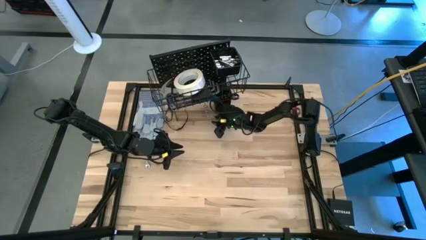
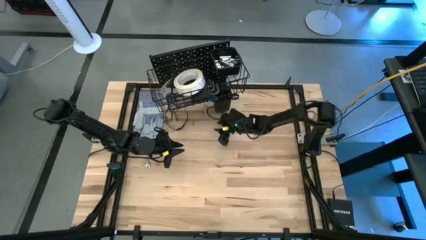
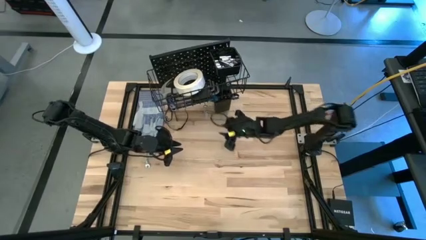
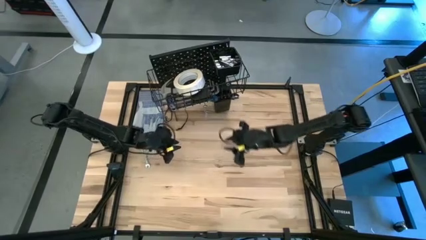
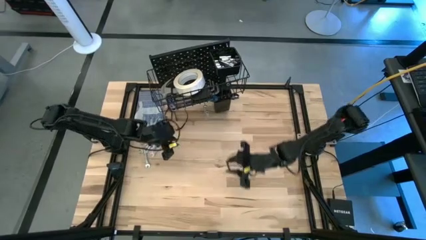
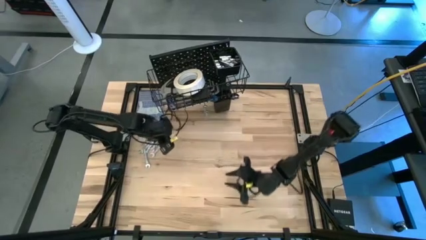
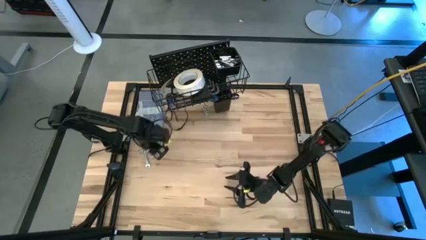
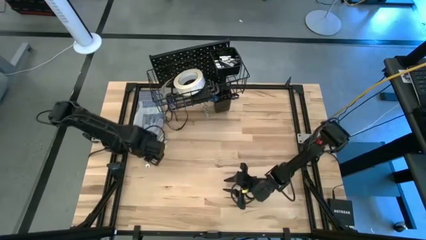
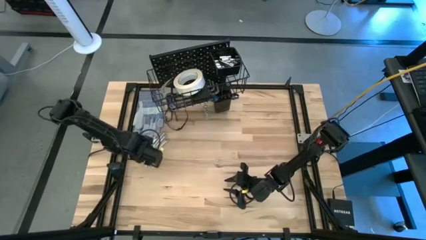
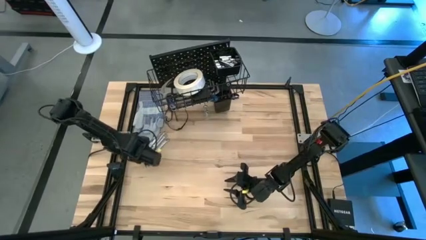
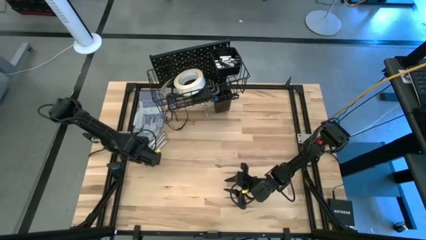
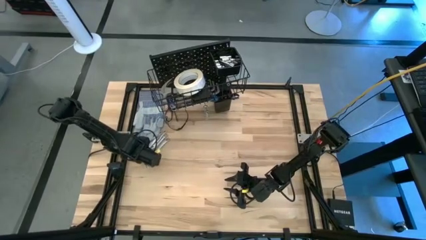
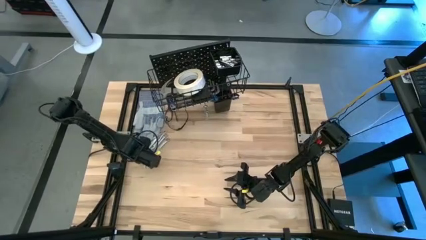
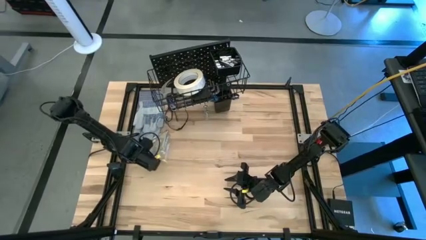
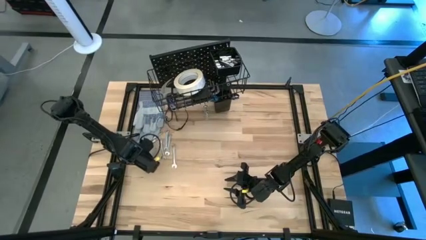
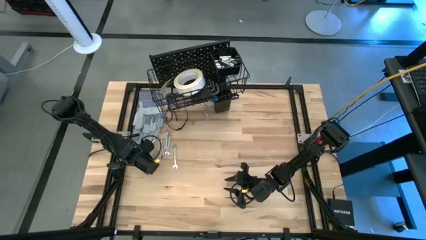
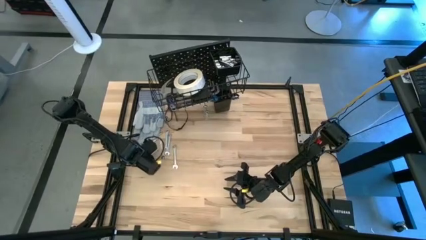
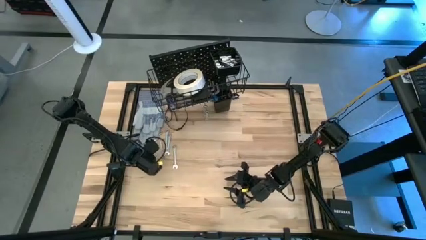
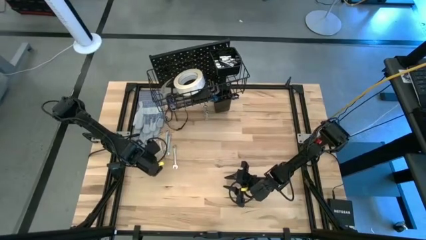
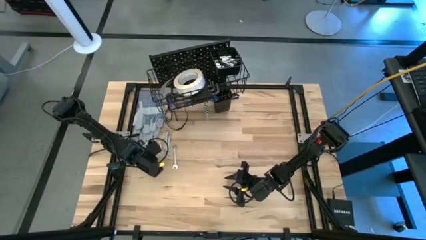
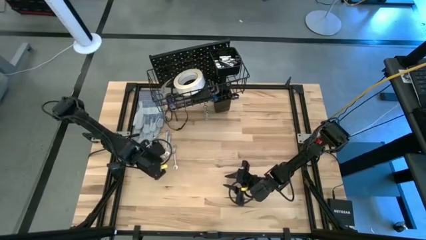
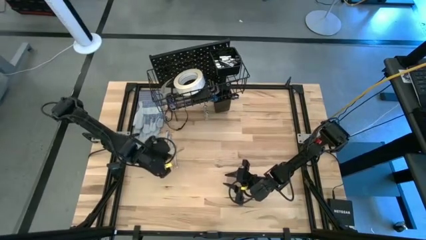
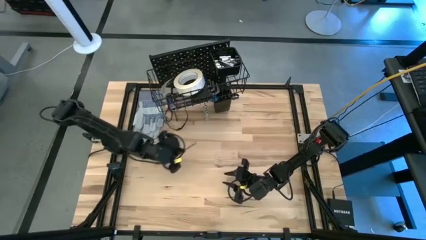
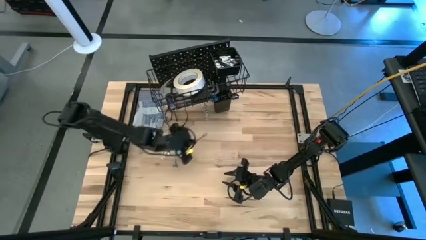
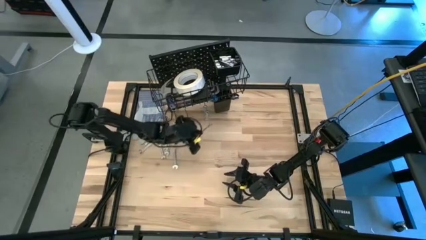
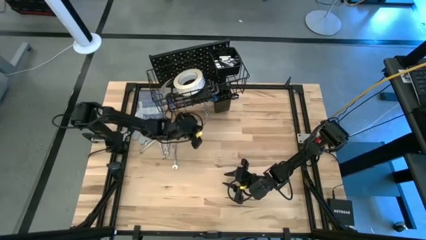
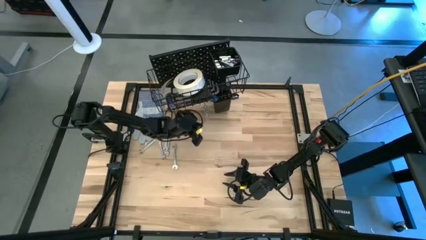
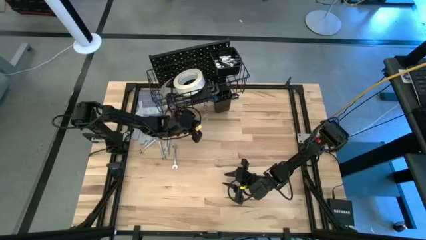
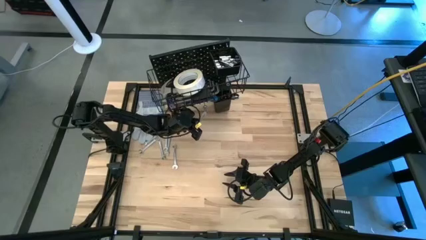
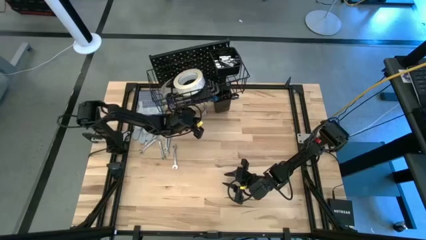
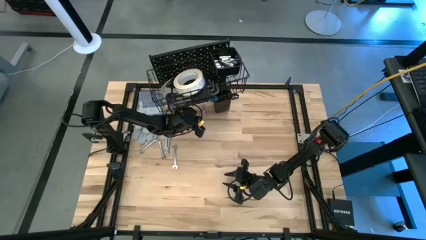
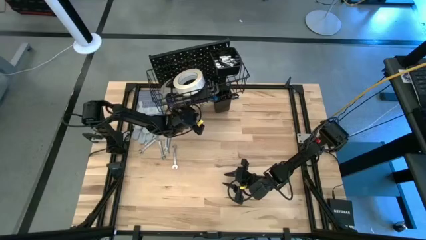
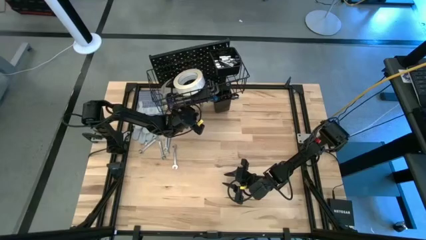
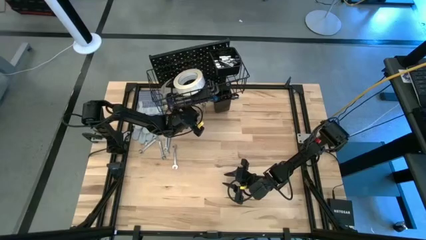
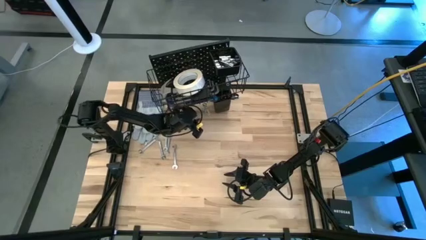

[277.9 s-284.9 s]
Task: Hang tools onto peg board
Hang the wrench on the pegboard

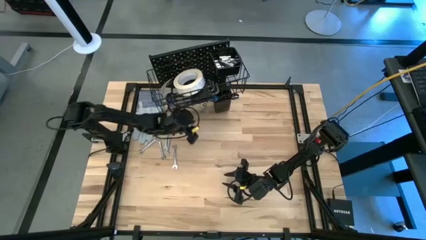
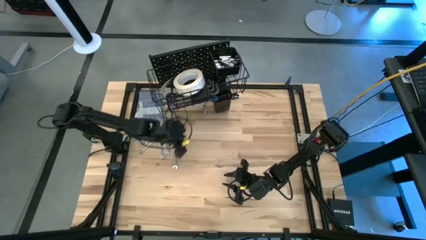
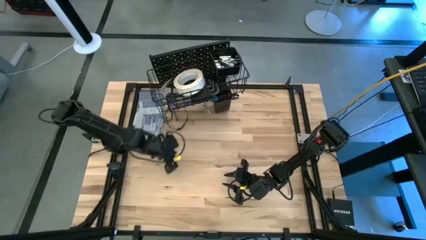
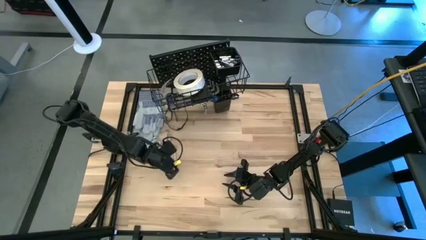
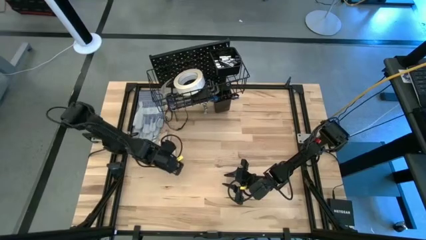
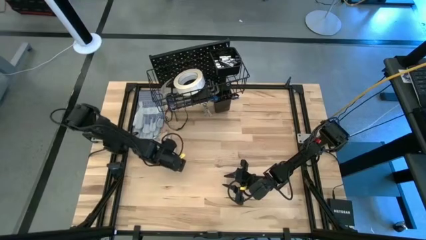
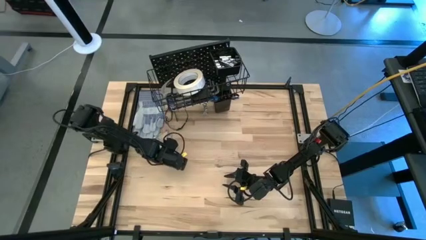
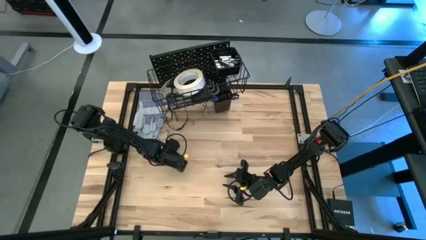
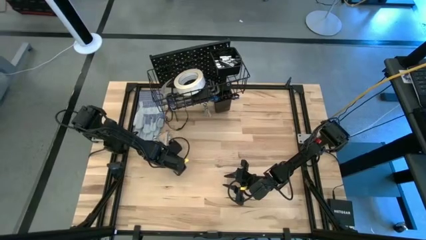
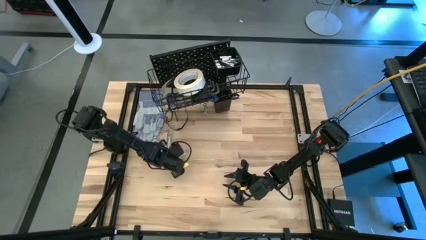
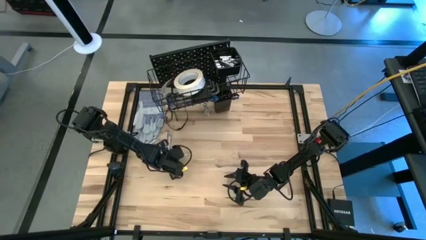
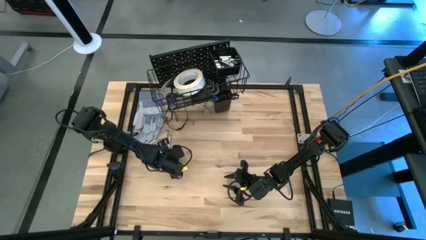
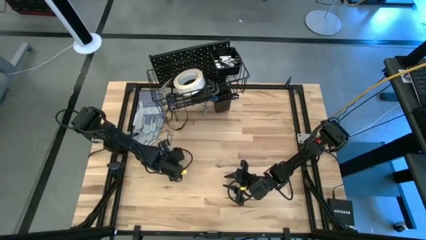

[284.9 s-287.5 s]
Hang the wrench on the pegboard

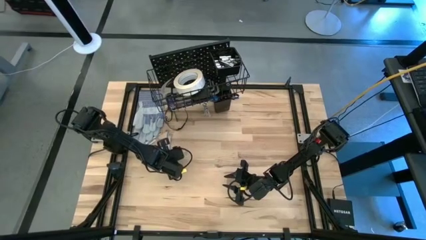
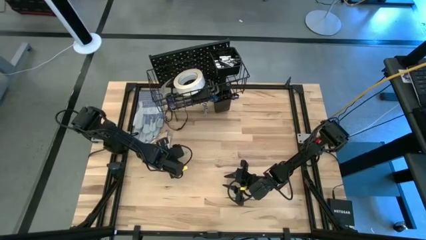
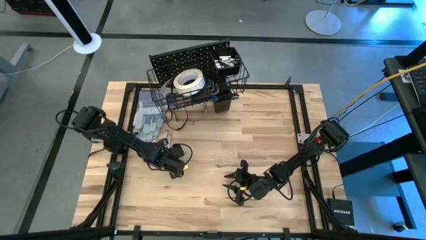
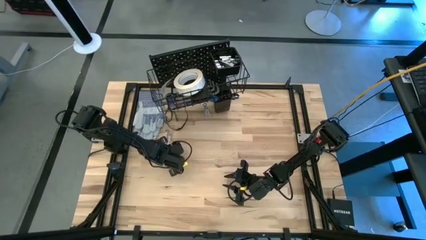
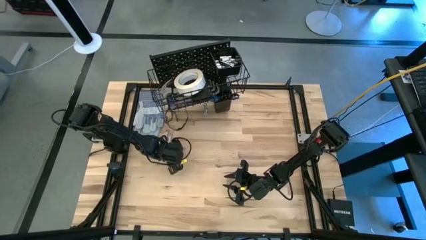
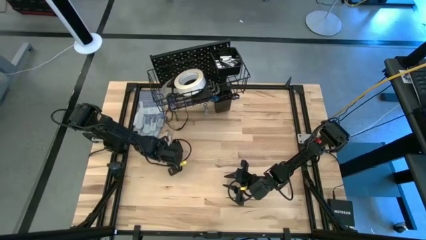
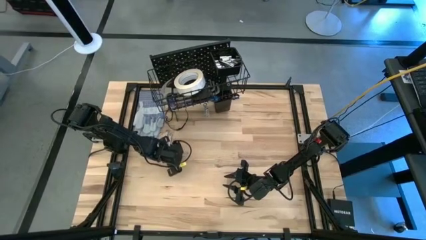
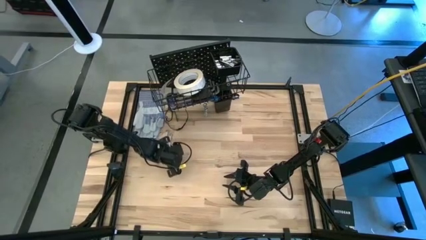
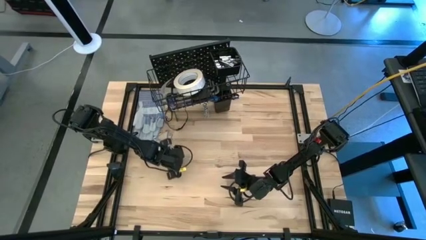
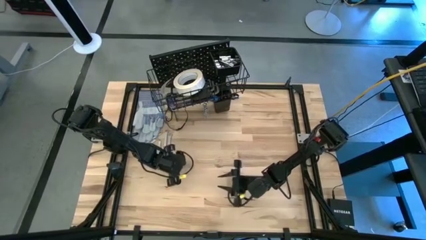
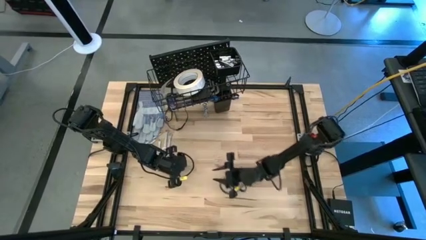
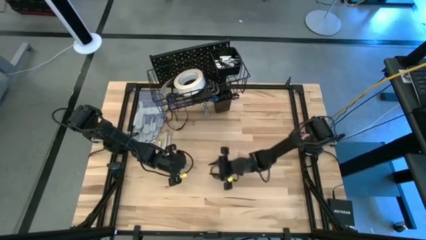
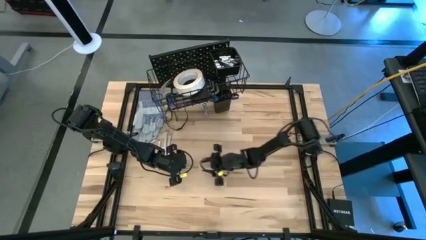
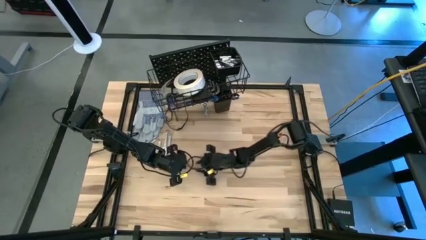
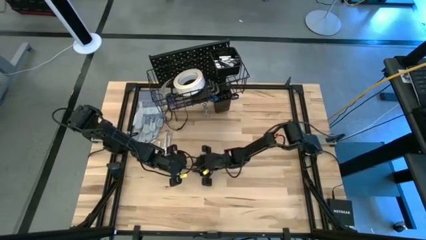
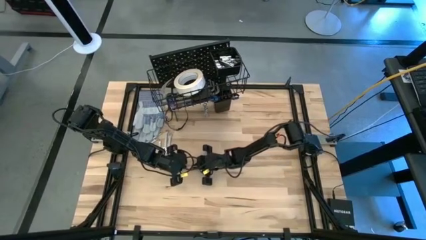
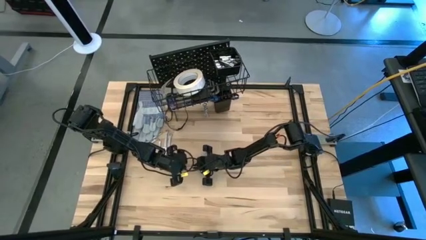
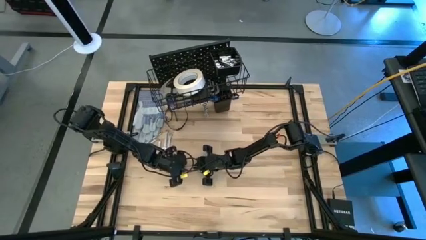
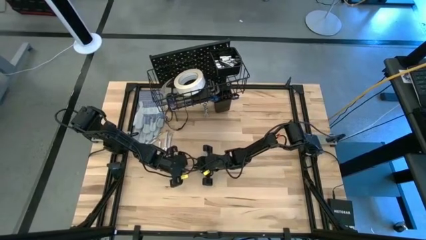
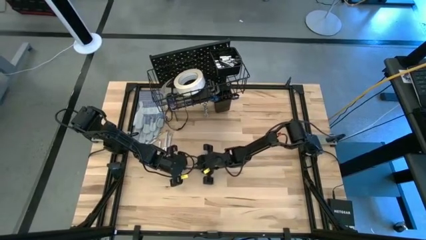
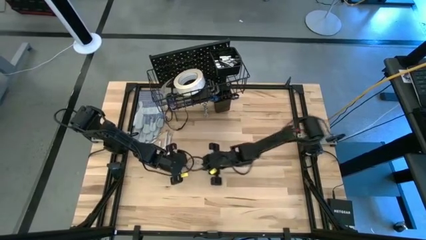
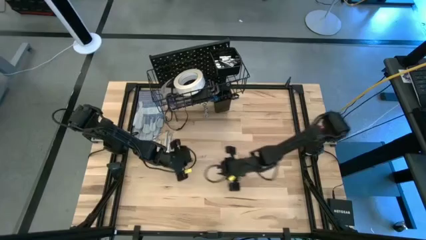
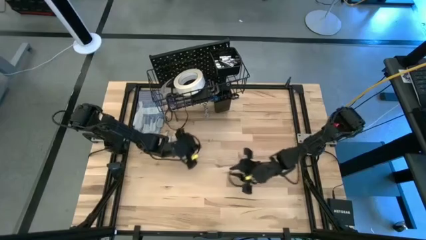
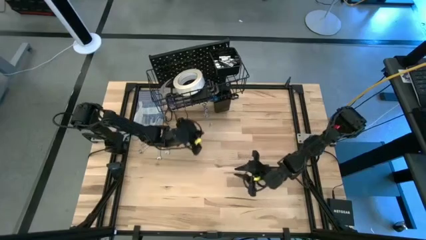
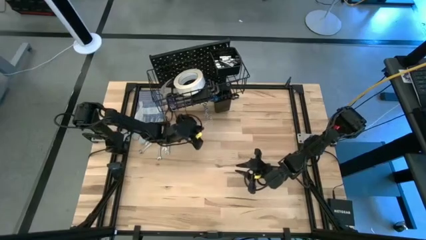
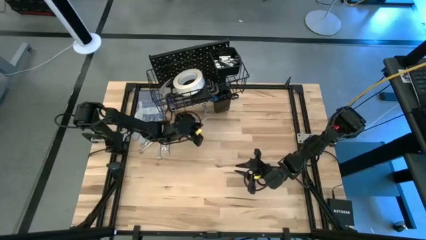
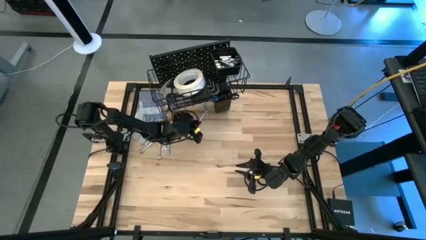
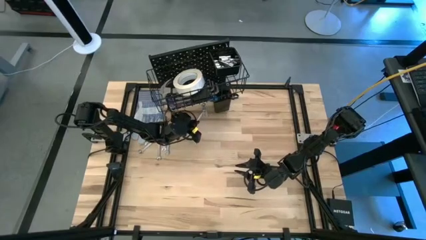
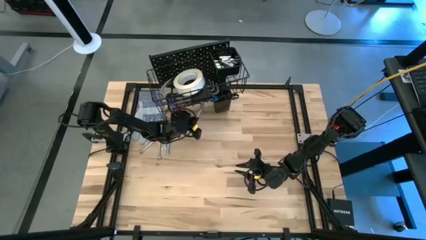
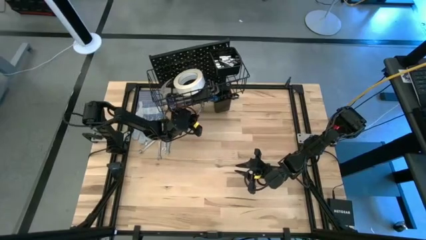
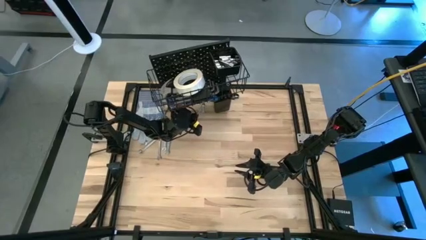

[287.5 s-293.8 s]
Hang the wrench on the pegboard

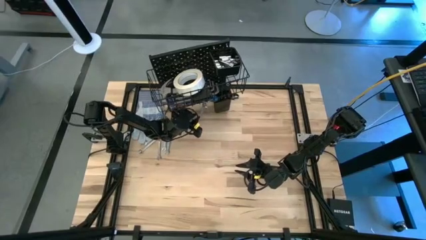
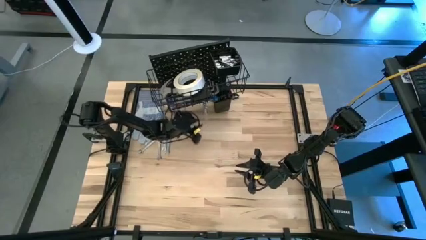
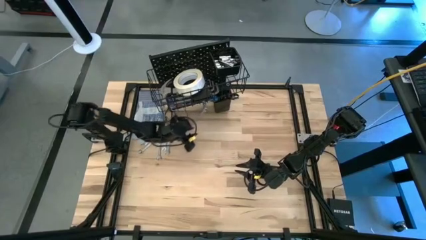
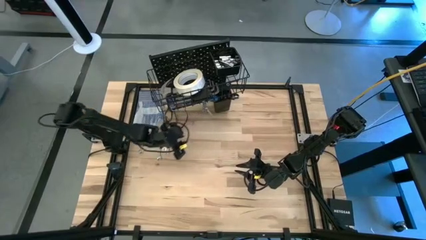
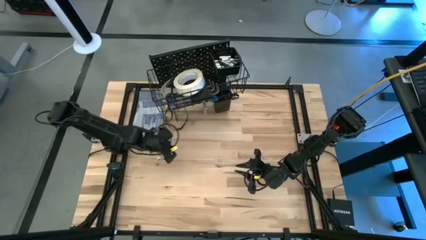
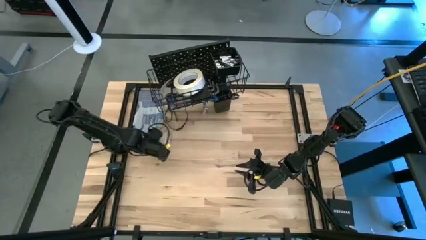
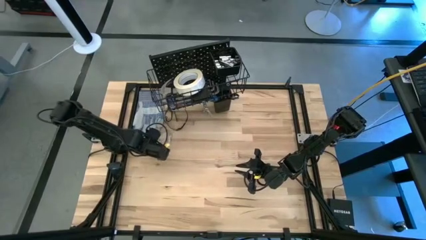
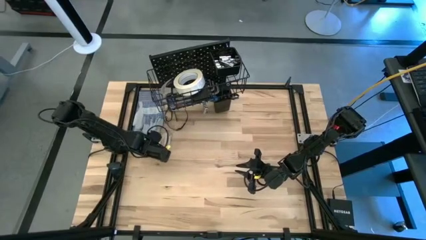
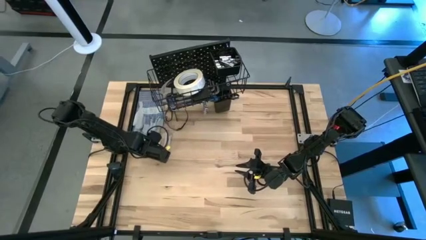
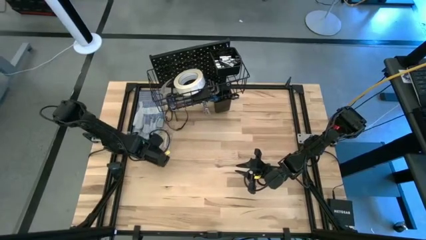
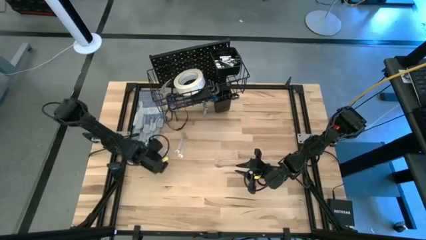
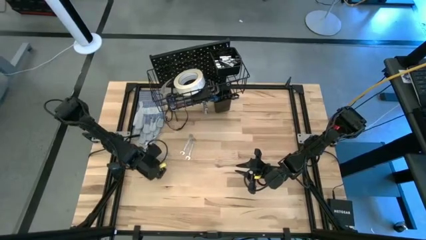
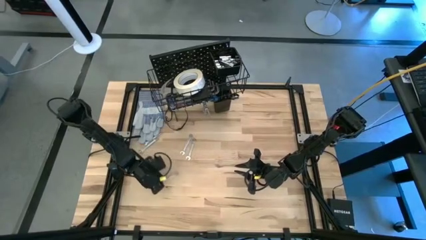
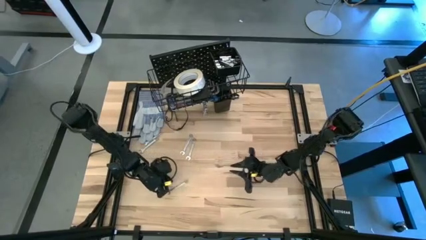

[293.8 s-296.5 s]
Hang the wrench on the pegboard
